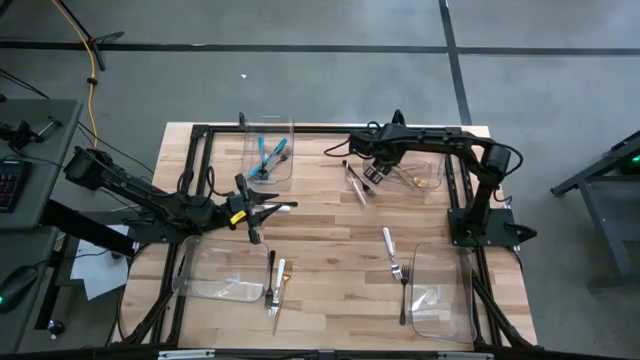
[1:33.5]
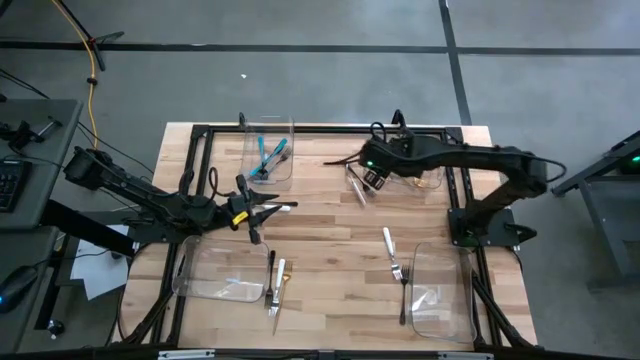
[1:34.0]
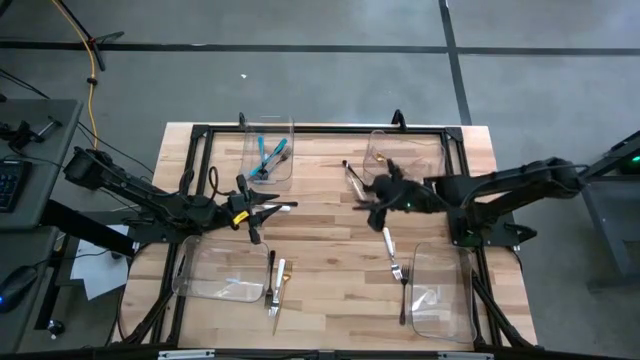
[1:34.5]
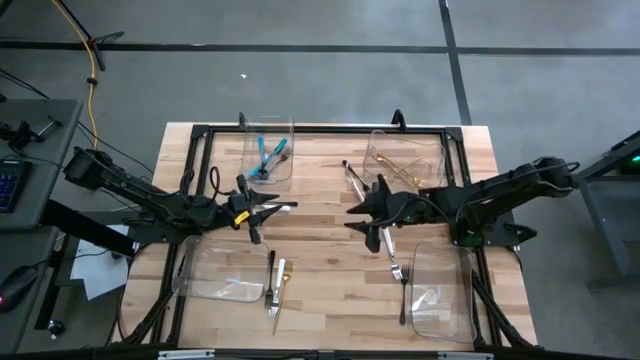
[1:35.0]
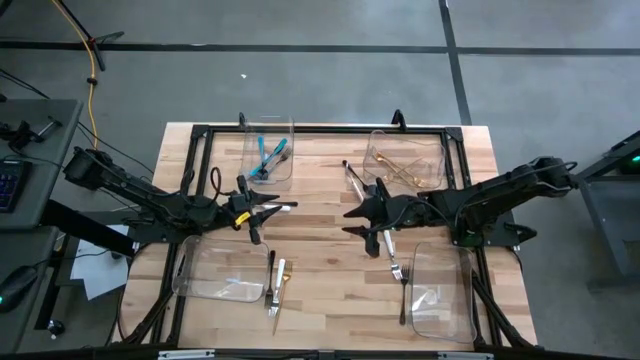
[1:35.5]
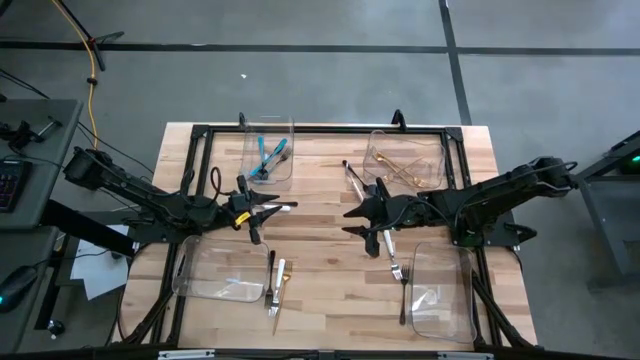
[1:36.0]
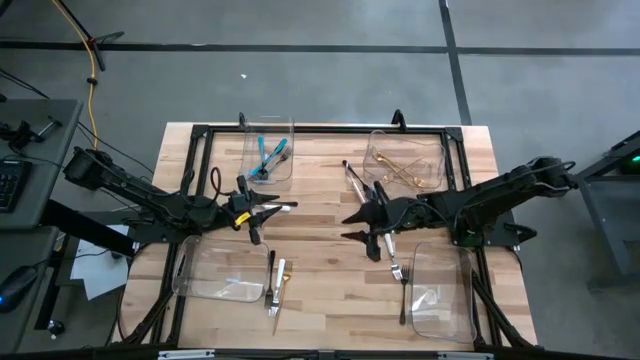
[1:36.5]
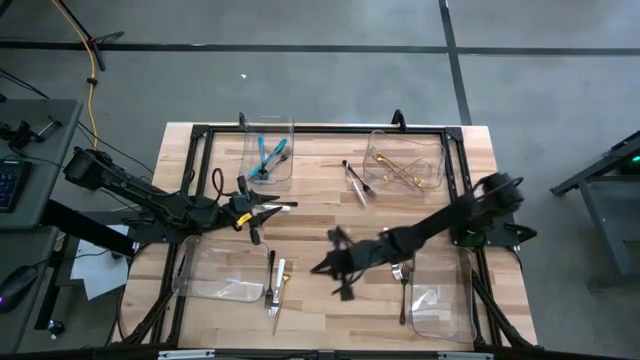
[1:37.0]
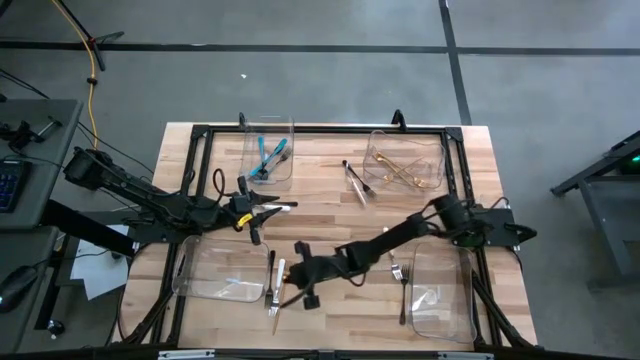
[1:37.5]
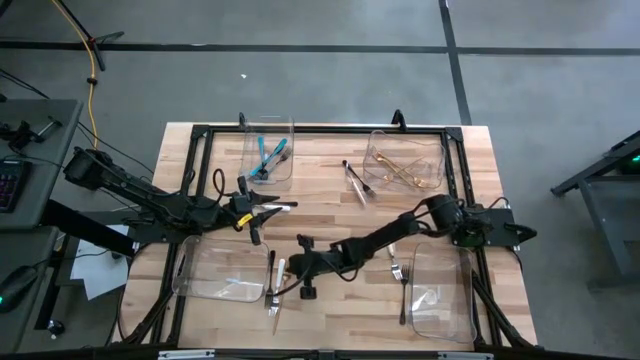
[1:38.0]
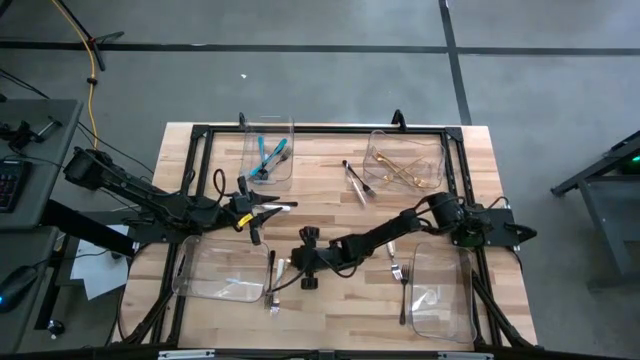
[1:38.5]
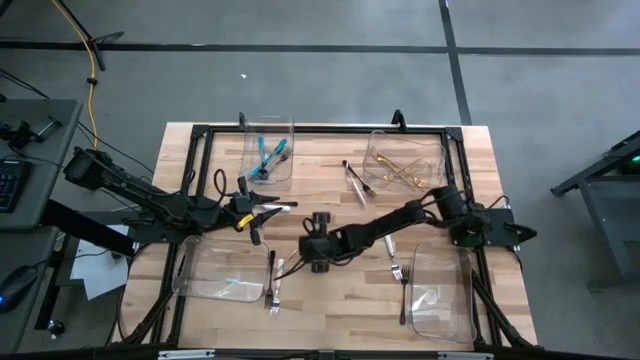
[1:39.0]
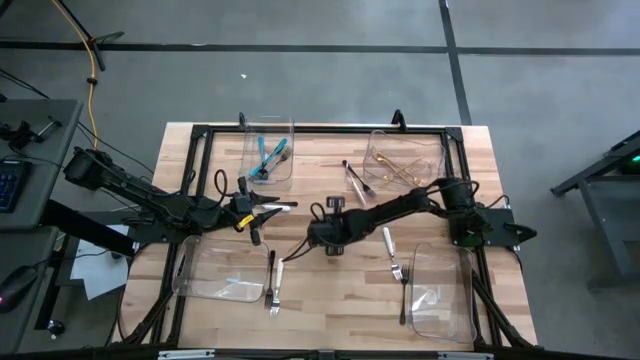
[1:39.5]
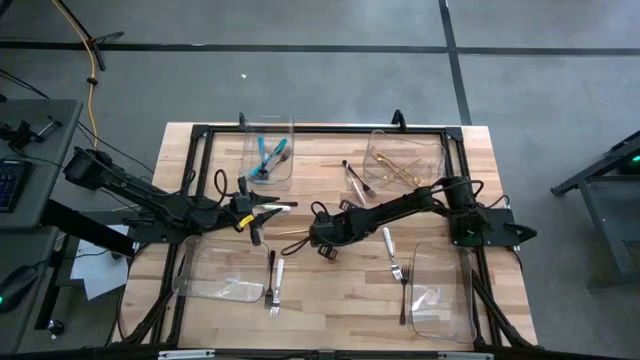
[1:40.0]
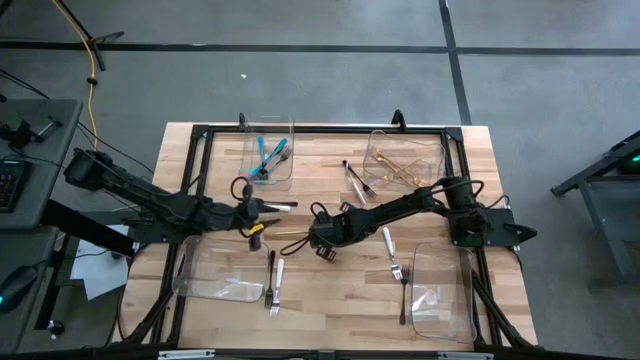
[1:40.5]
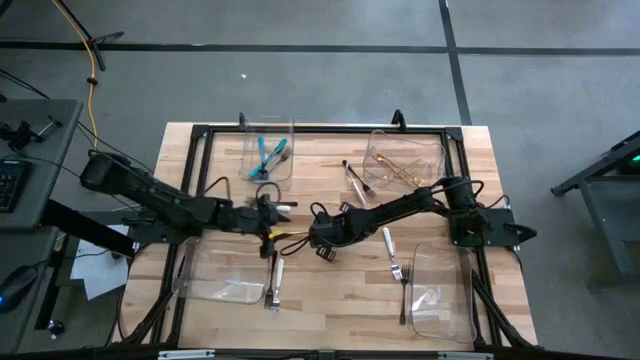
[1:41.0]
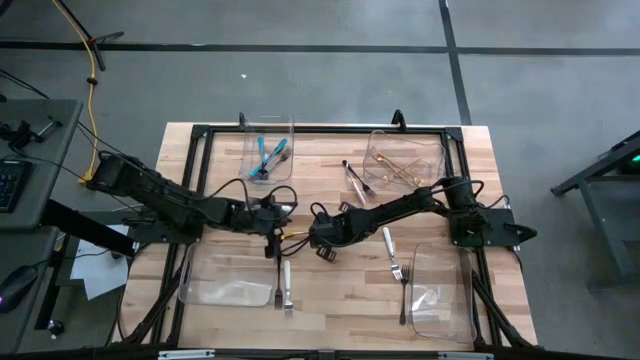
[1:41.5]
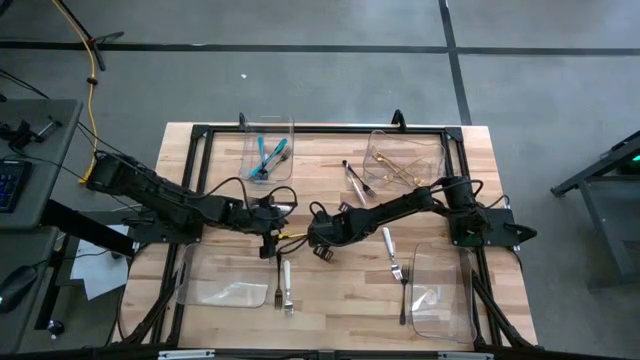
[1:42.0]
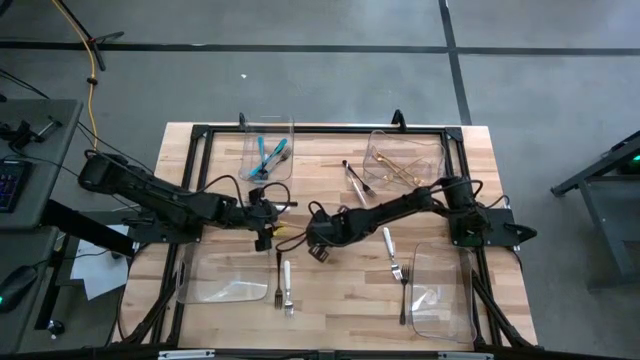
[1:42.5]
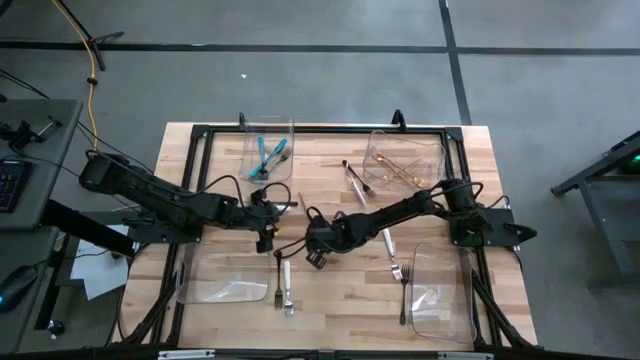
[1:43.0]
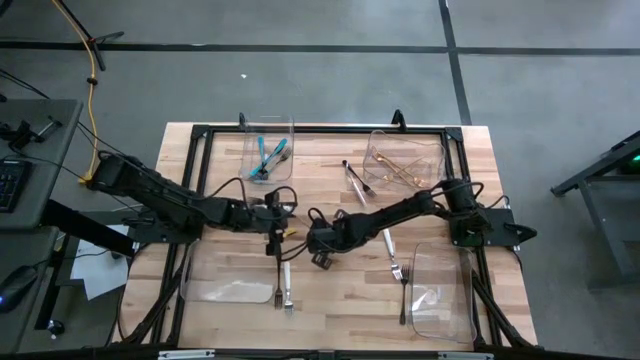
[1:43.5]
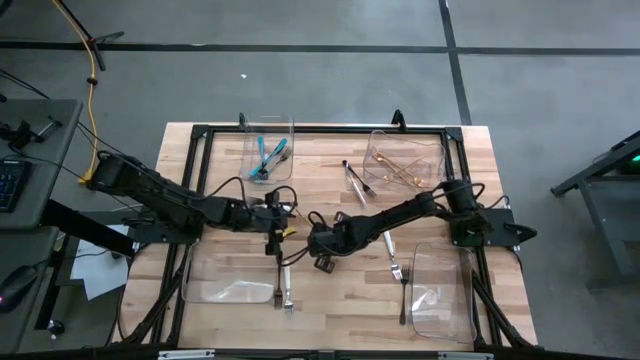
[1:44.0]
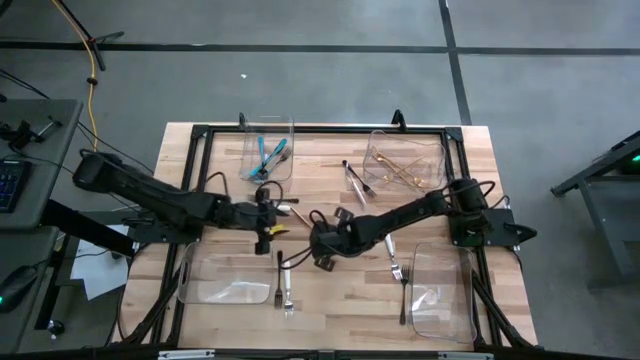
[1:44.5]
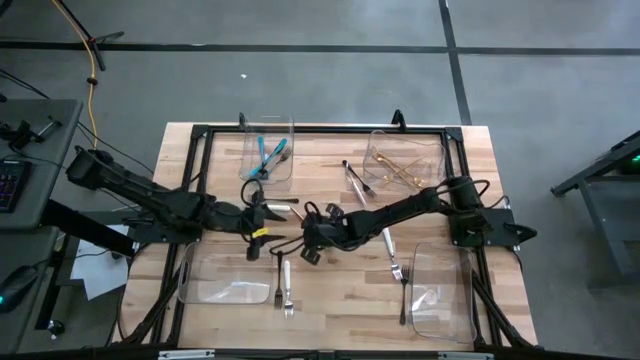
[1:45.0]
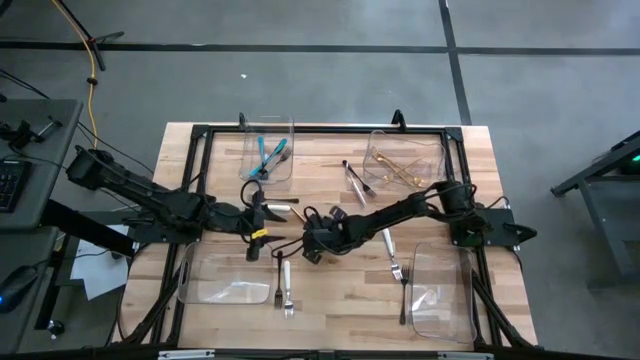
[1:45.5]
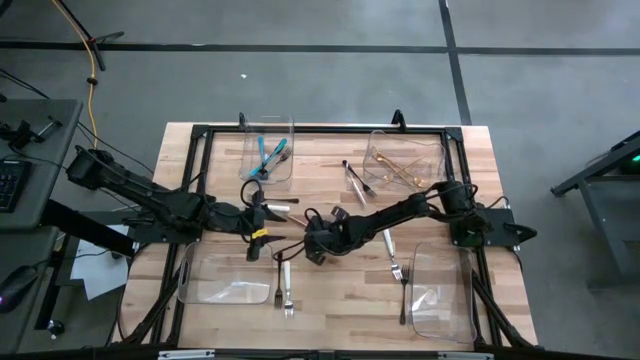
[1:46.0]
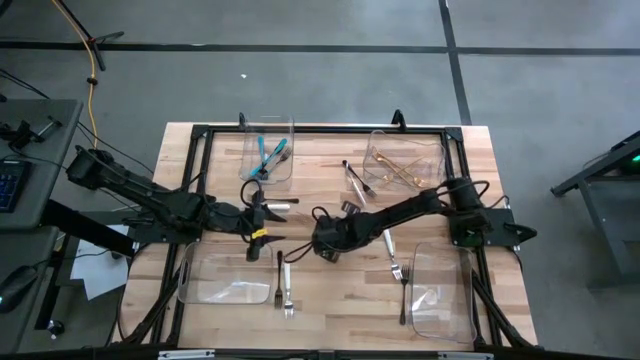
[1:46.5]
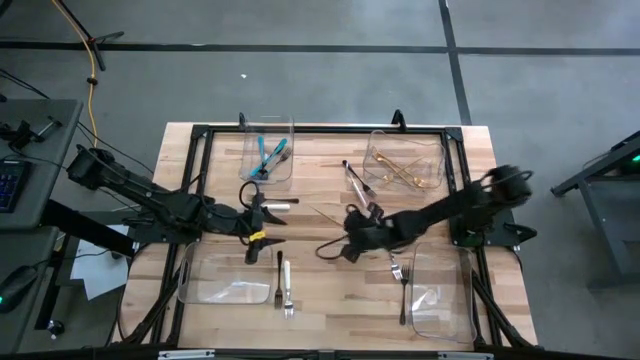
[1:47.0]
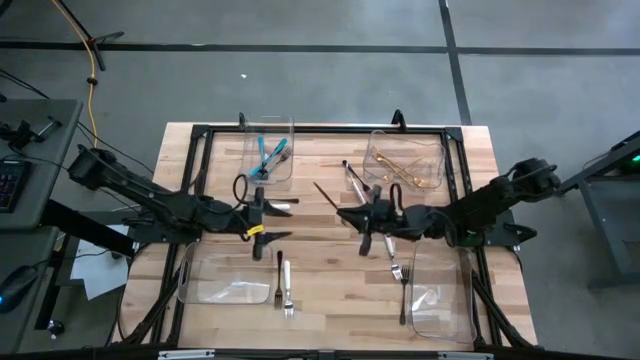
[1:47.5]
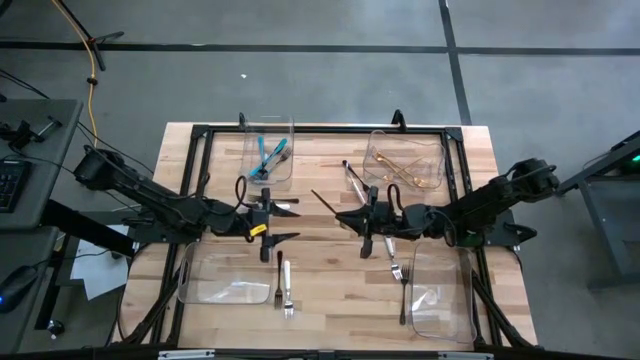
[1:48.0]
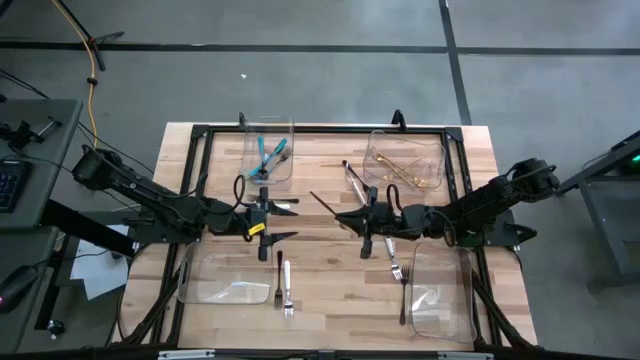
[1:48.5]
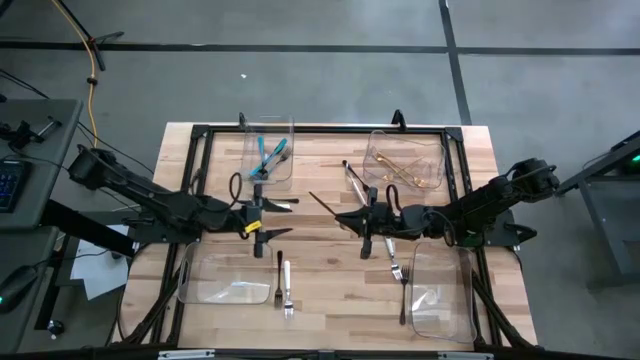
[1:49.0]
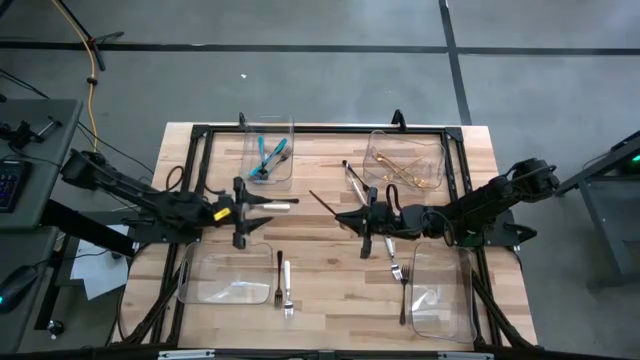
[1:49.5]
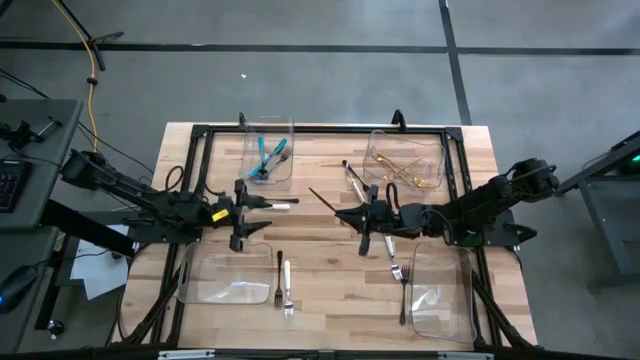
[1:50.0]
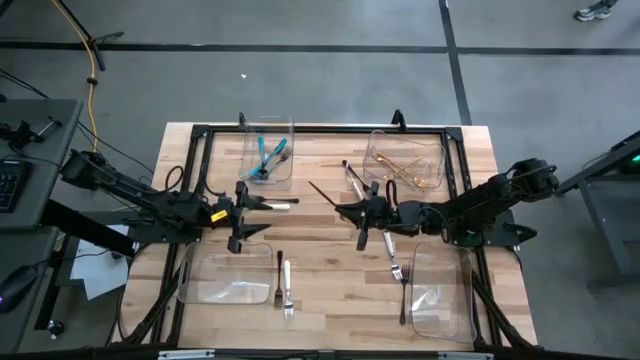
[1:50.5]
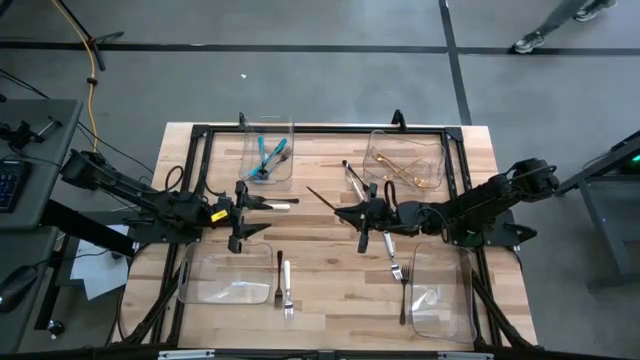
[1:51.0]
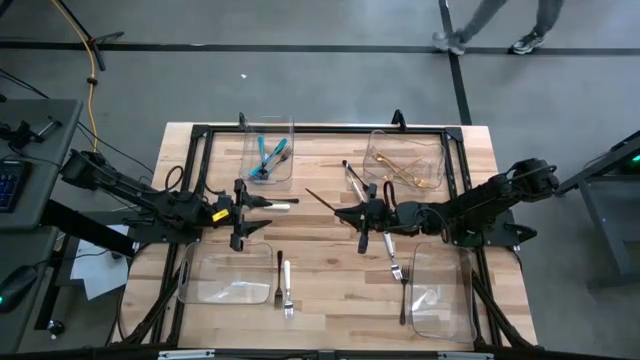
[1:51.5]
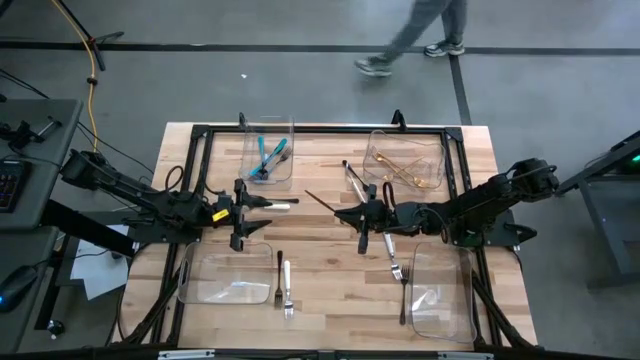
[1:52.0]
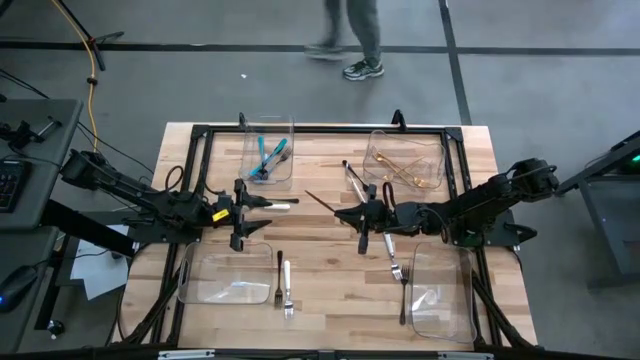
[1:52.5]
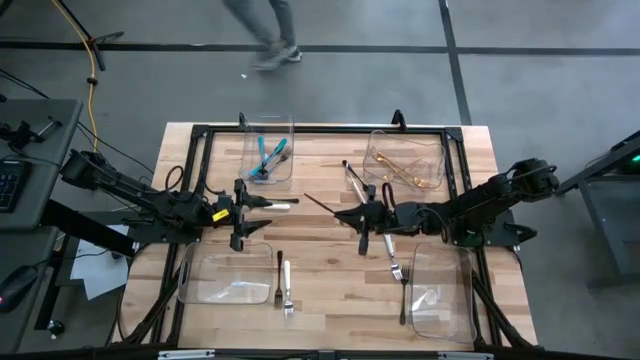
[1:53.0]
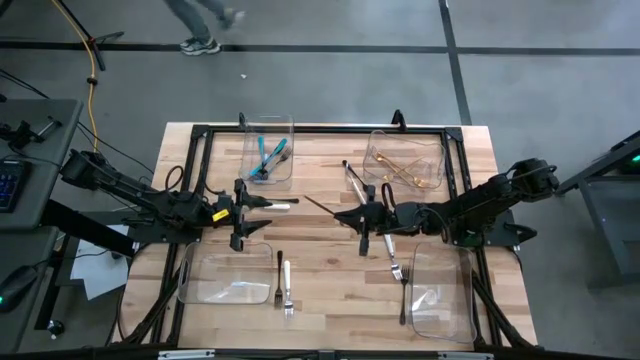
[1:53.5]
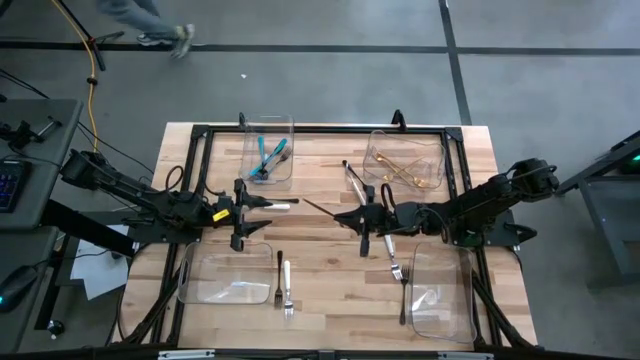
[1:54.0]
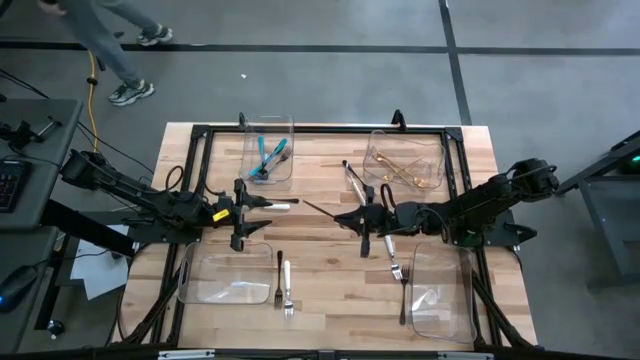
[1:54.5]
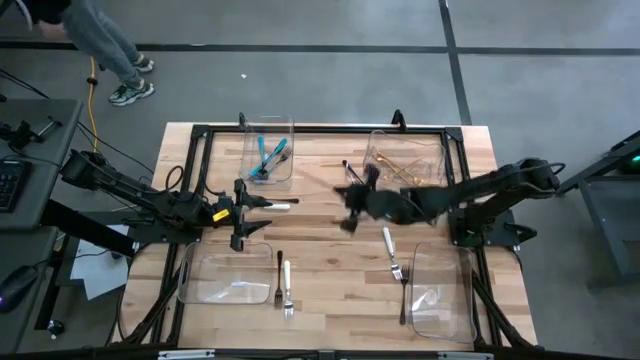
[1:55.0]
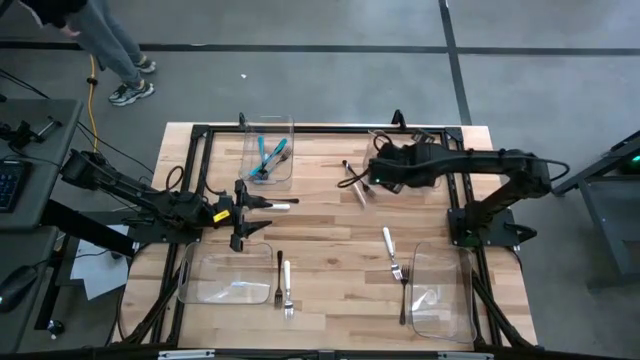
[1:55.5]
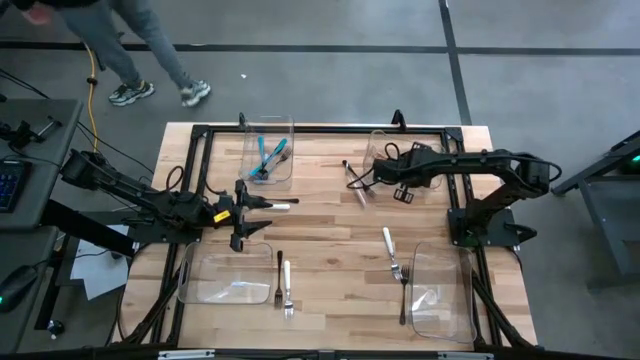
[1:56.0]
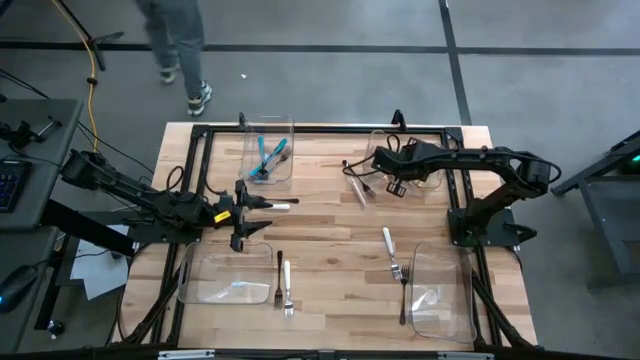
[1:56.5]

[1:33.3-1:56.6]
Task: Sort silverware by color (type)
Put the gold fork into the top right transparent bin
